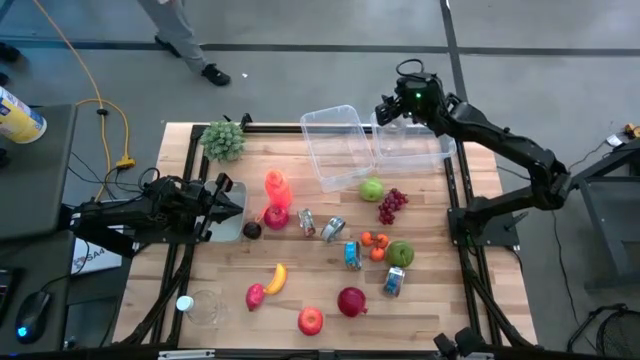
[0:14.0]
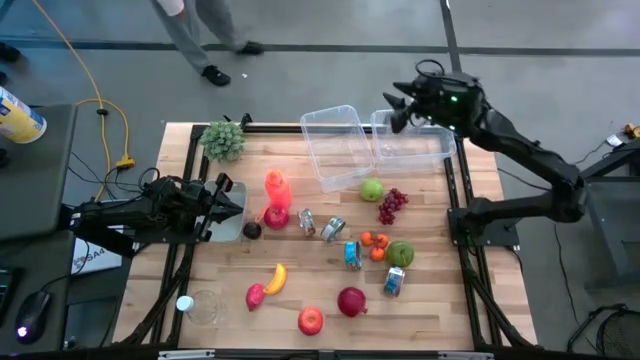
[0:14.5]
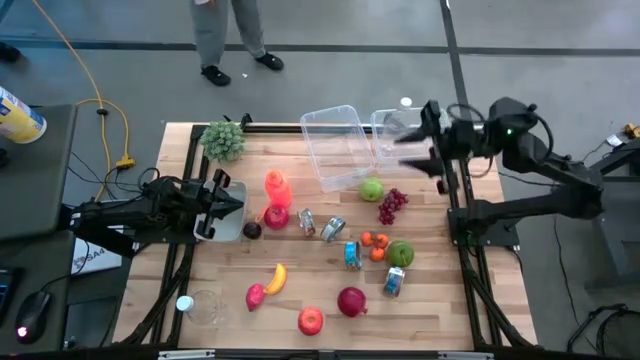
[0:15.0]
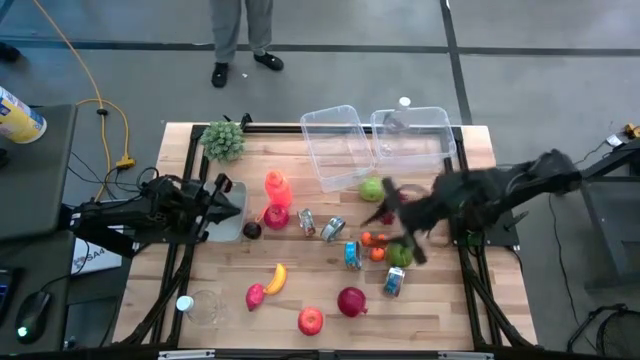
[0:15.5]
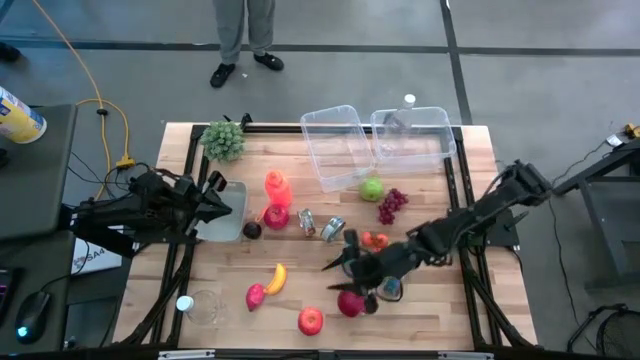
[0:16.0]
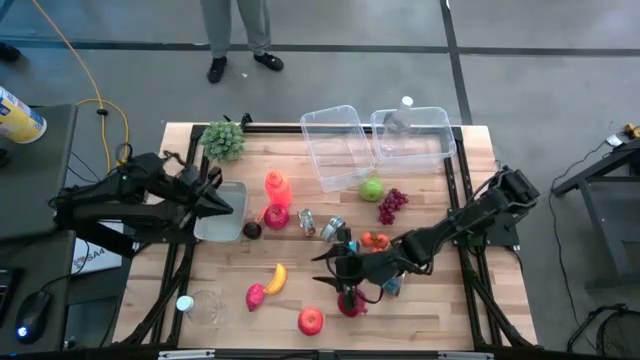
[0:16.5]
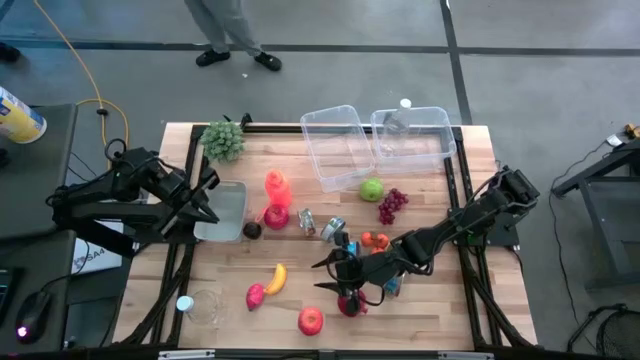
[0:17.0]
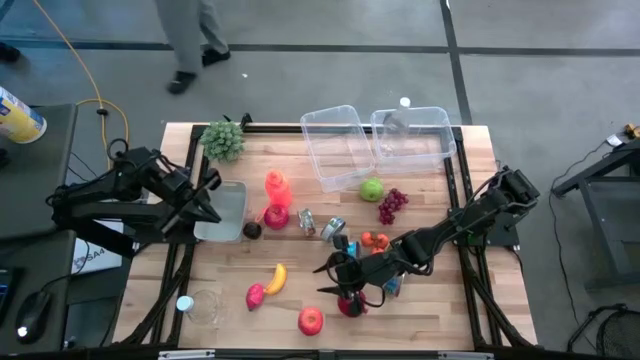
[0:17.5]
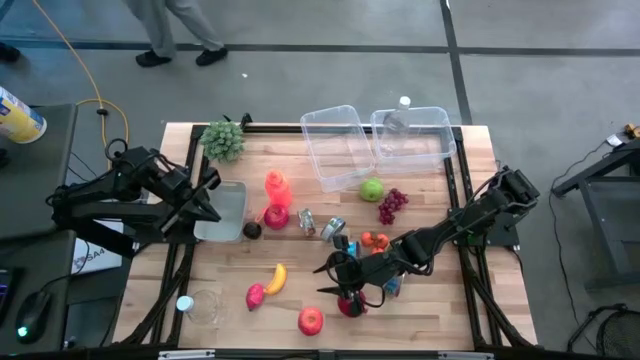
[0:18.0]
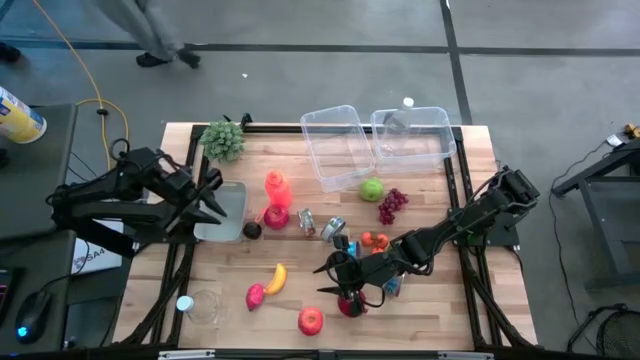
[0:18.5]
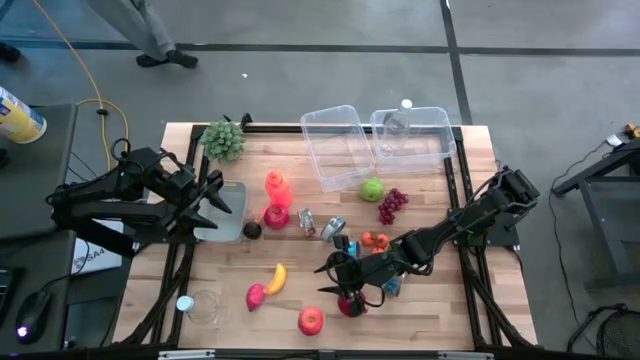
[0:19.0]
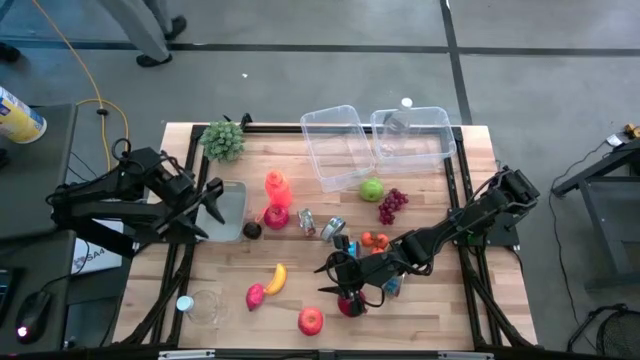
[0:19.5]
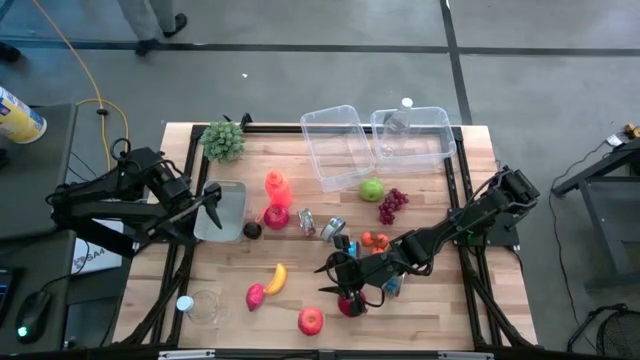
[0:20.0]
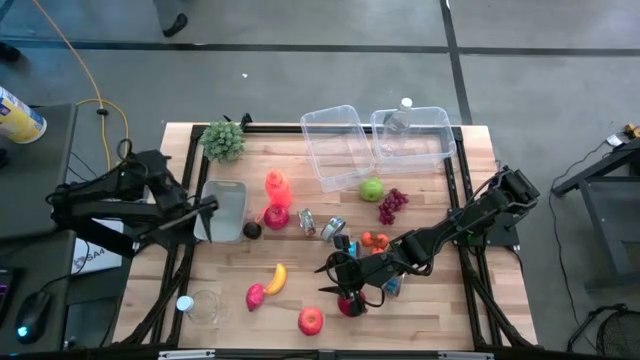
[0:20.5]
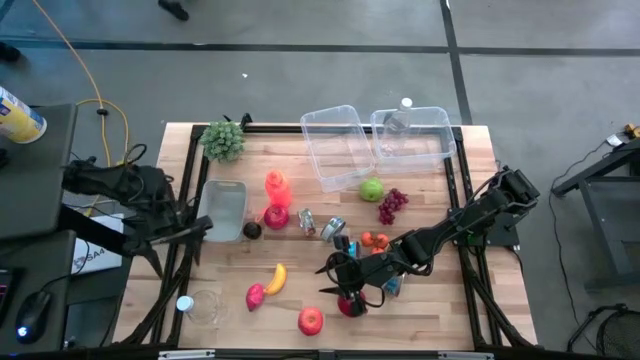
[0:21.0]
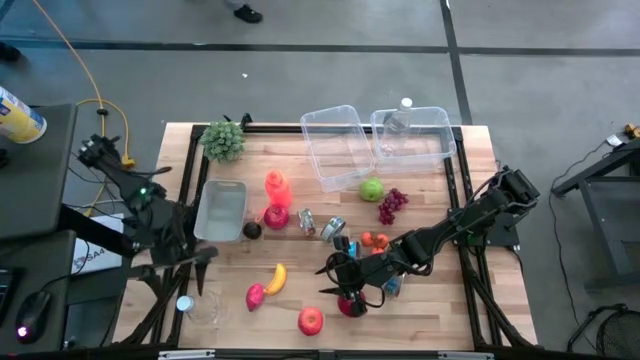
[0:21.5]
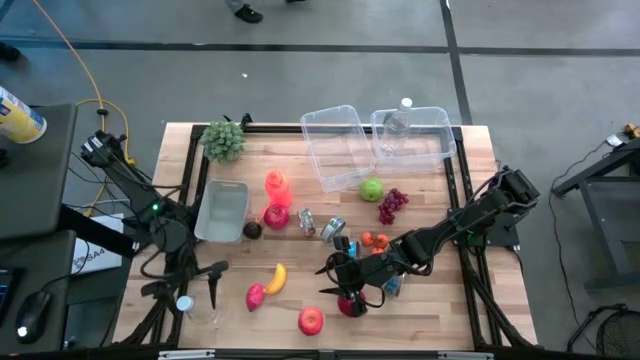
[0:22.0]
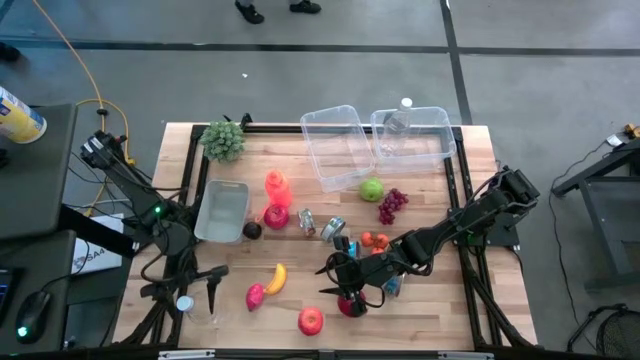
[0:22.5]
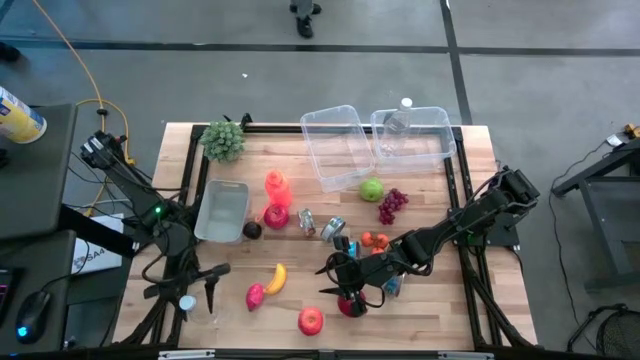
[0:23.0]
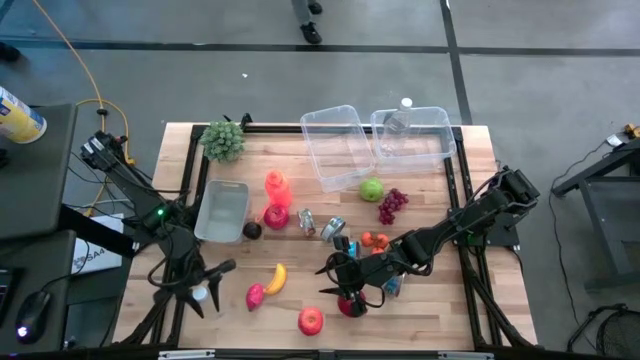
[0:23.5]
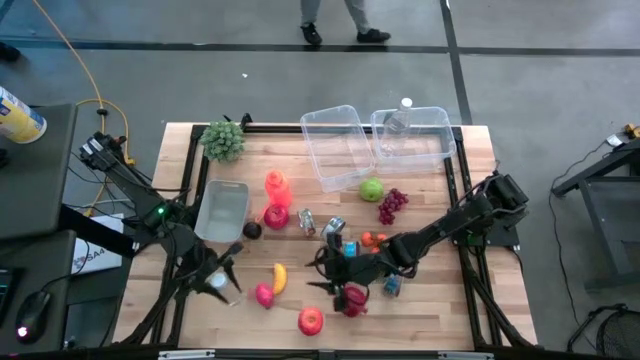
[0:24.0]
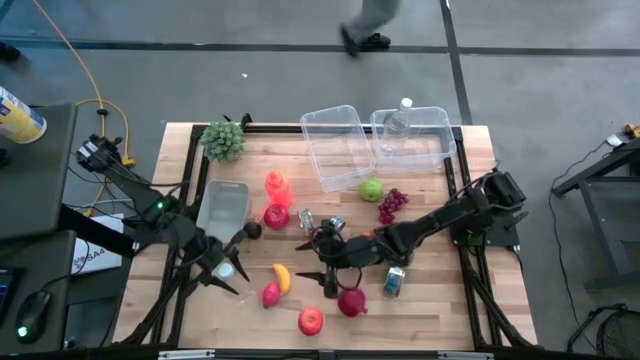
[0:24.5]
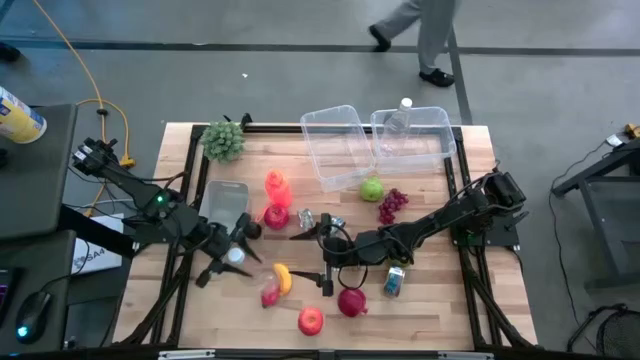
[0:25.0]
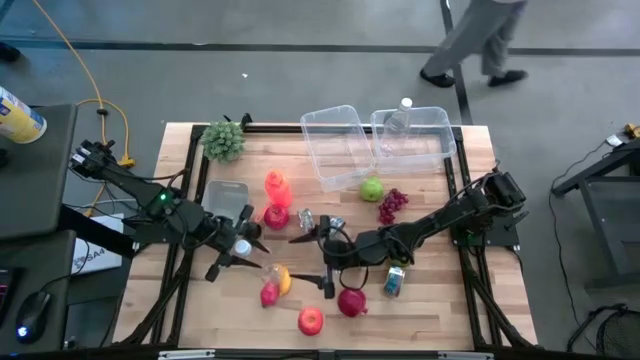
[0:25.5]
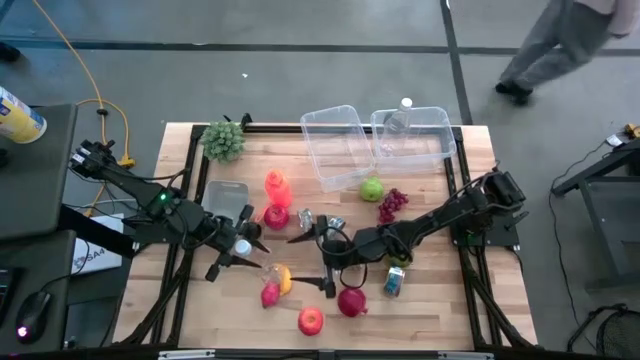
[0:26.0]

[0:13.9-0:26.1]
Task: Pick & Place Food Item
Put the transparent bottle into the right transparent bin

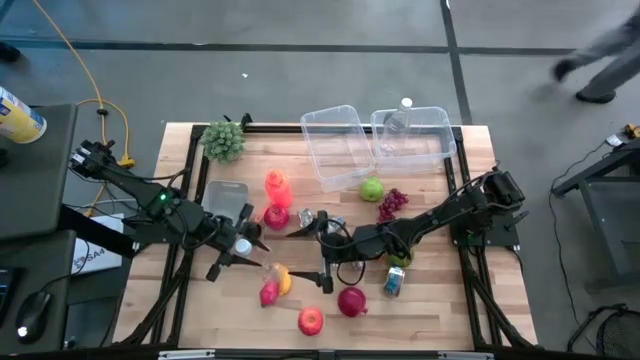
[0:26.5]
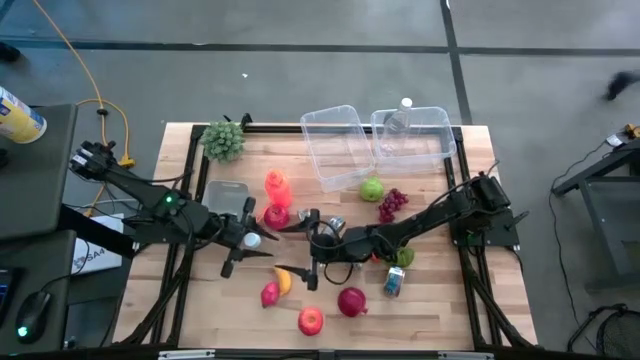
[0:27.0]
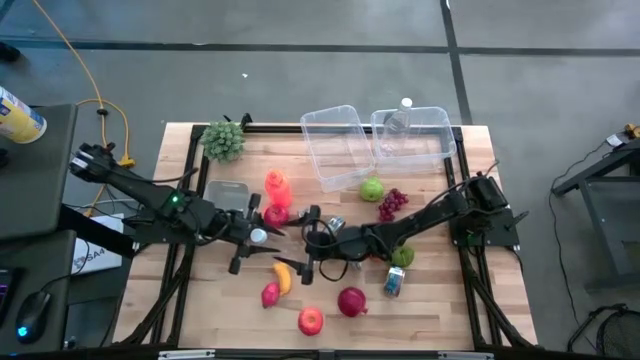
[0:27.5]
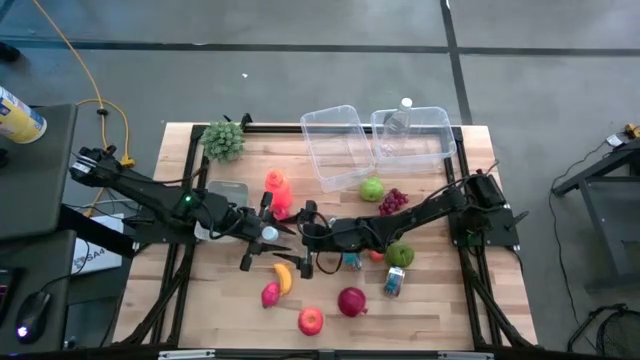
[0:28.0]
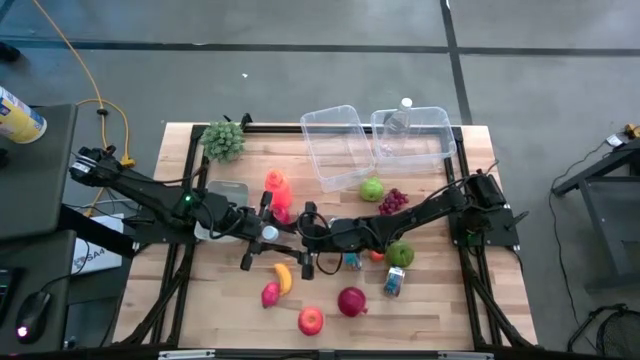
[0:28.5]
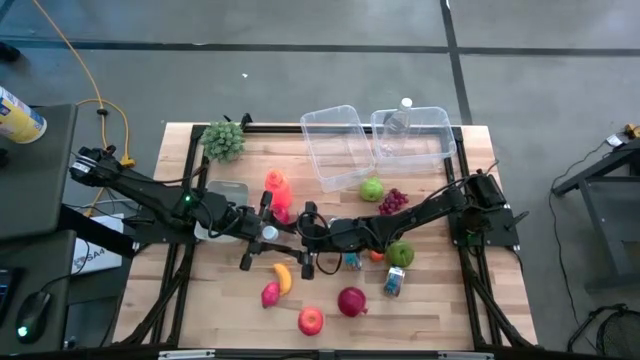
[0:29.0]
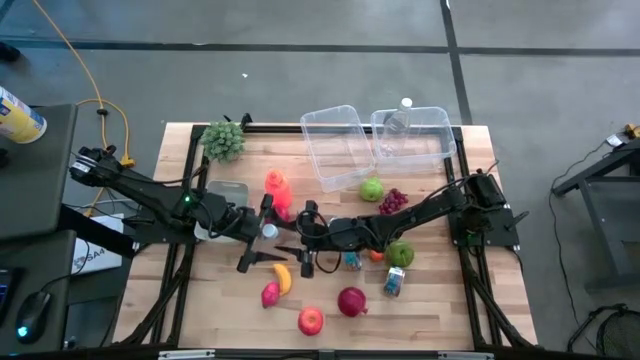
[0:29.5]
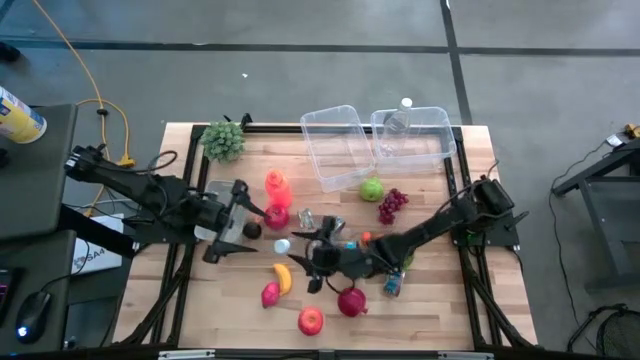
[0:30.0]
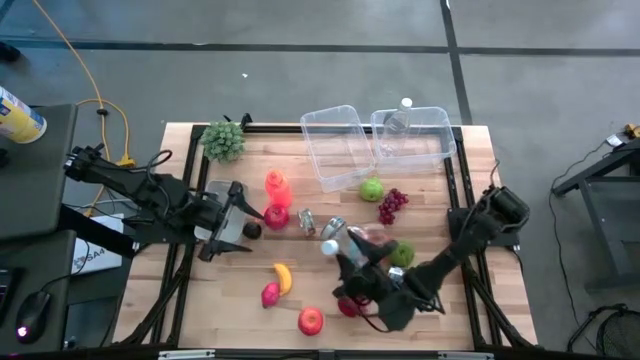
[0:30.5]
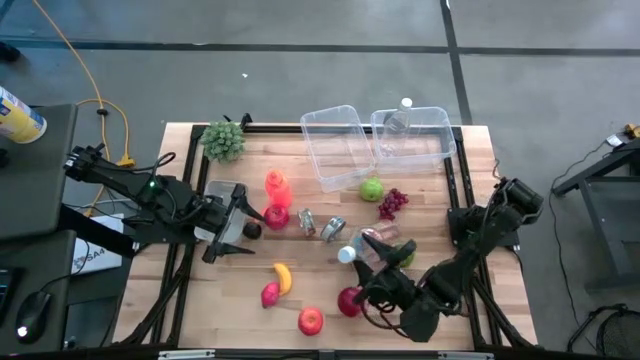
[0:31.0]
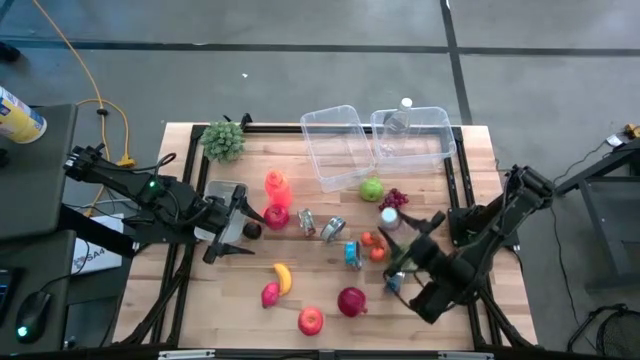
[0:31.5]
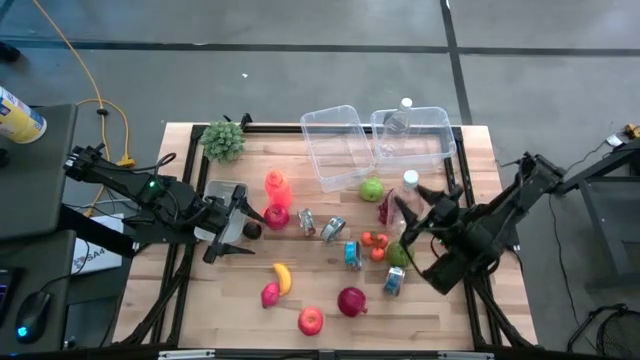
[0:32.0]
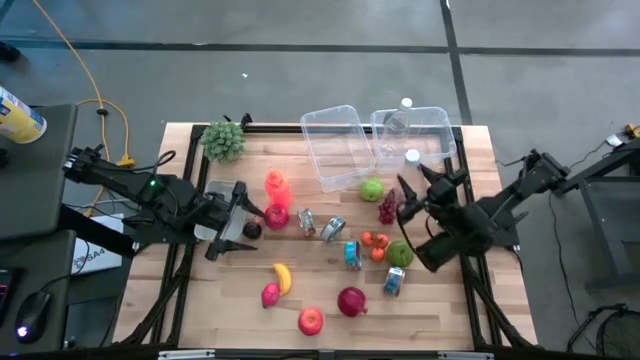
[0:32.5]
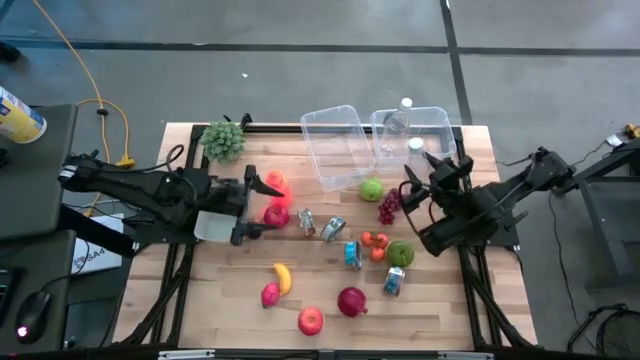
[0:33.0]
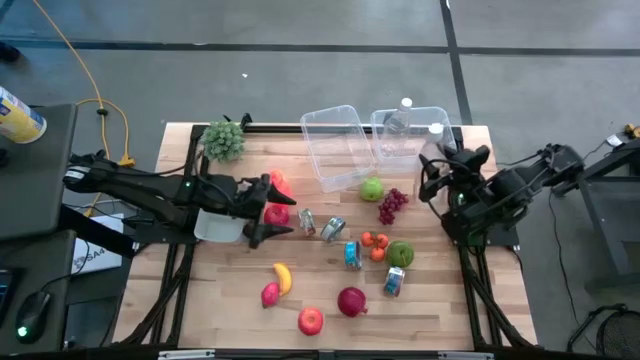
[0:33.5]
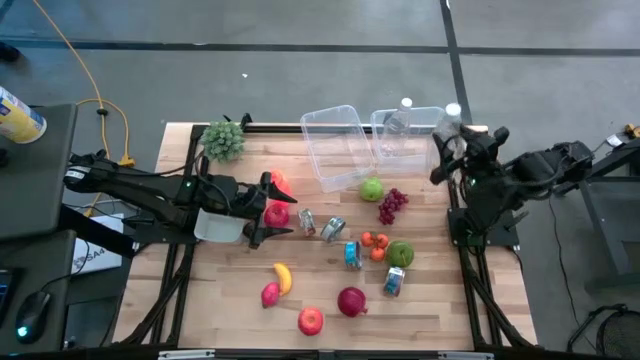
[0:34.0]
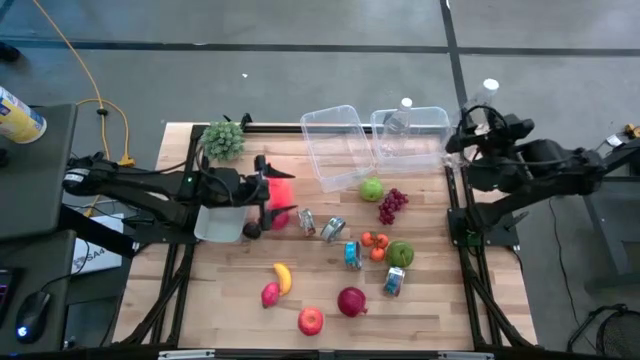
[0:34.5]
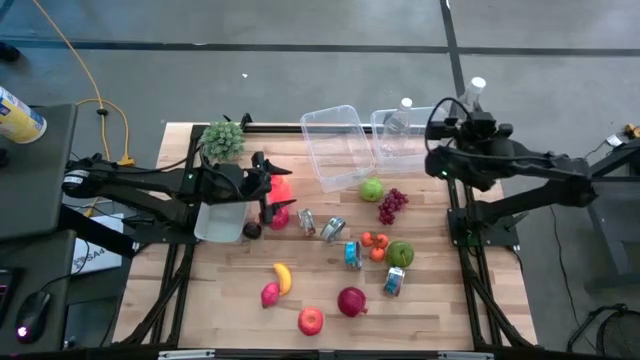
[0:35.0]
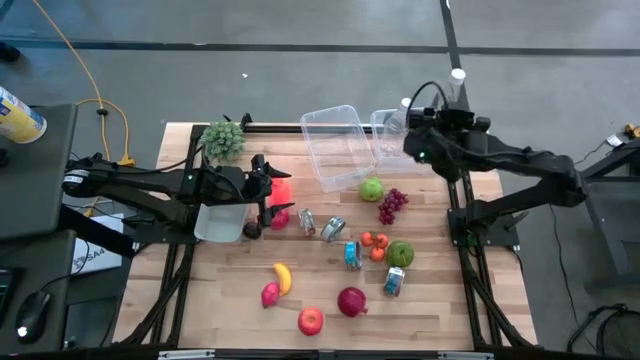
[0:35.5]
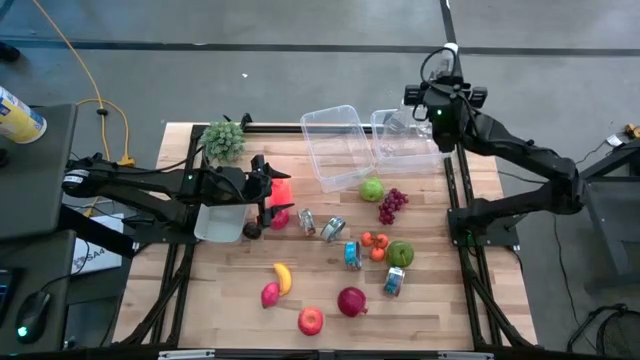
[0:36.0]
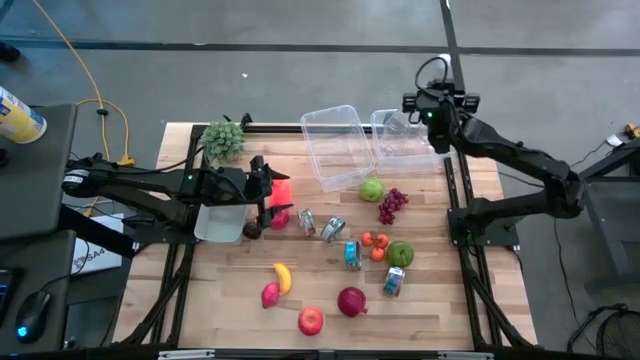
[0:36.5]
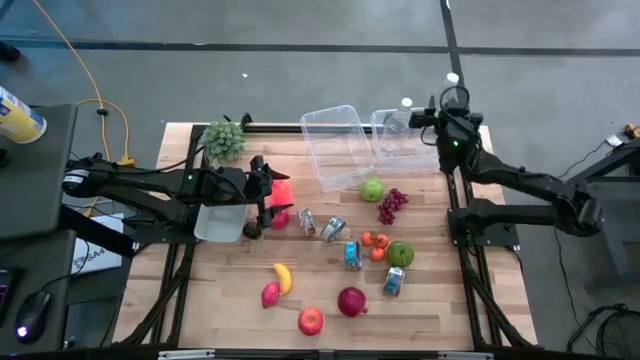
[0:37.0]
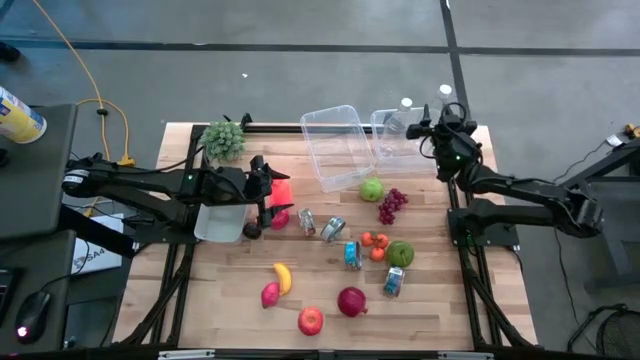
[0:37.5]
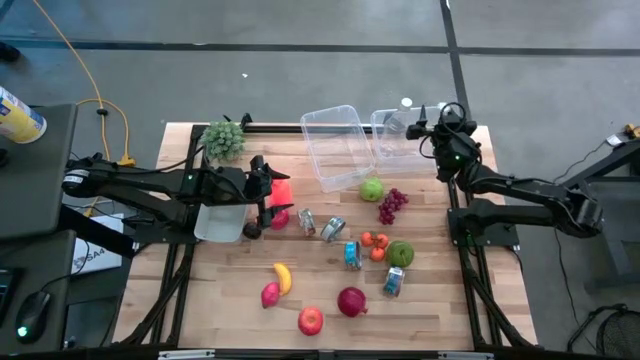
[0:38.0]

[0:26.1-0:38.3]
Put the transparent bottle into the right transparent bin
